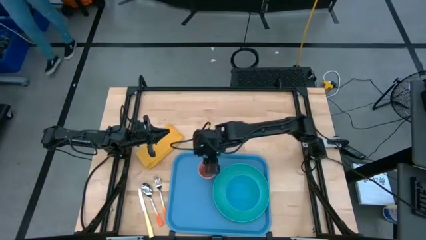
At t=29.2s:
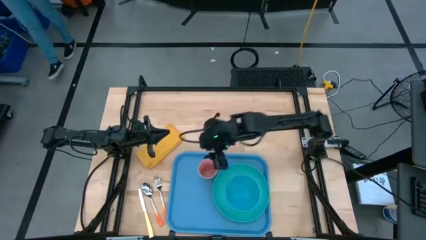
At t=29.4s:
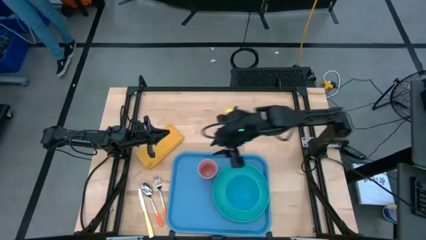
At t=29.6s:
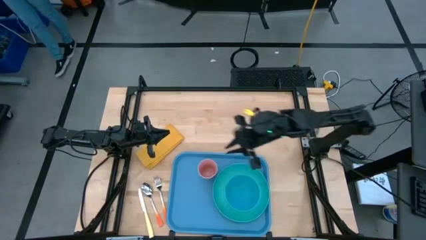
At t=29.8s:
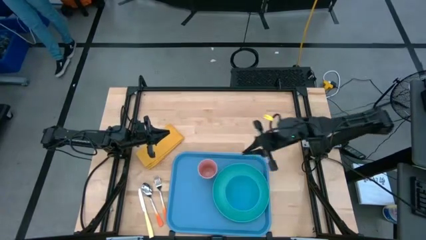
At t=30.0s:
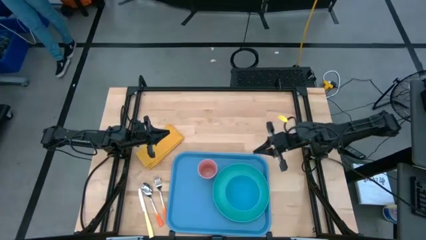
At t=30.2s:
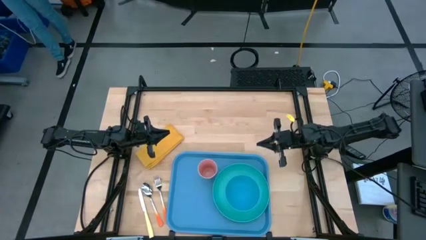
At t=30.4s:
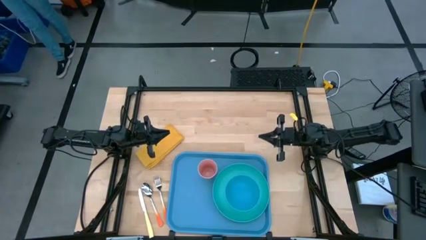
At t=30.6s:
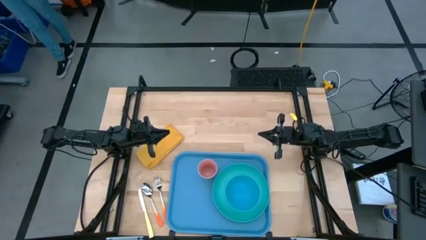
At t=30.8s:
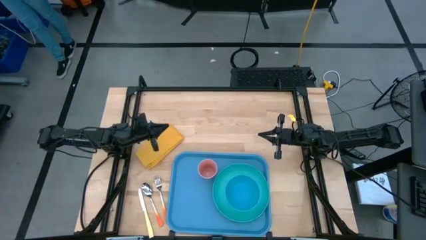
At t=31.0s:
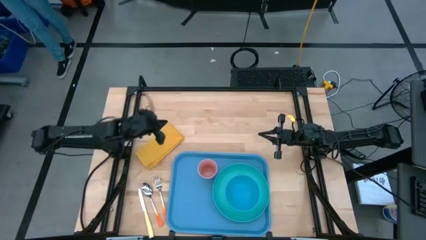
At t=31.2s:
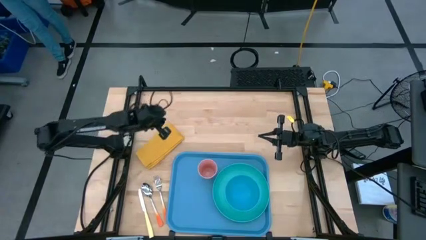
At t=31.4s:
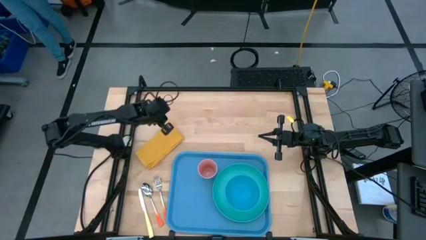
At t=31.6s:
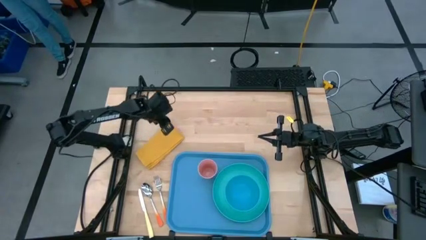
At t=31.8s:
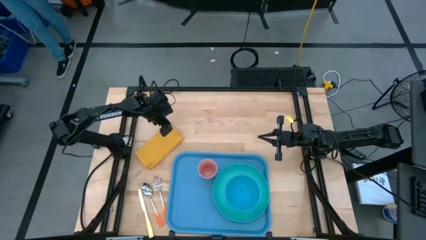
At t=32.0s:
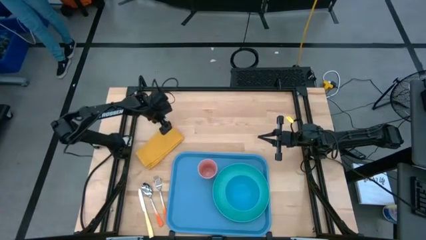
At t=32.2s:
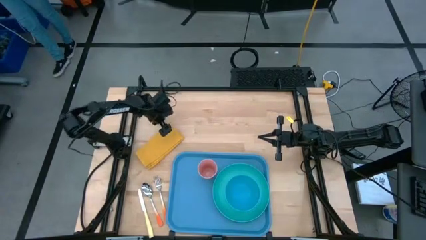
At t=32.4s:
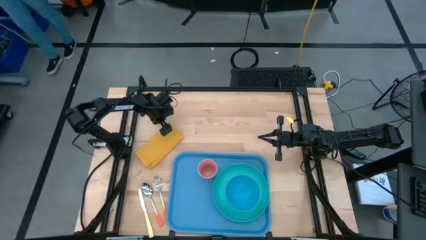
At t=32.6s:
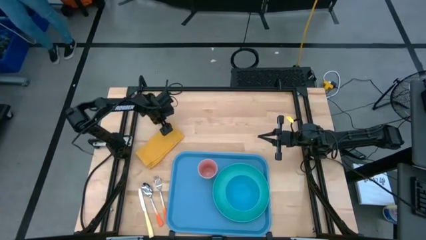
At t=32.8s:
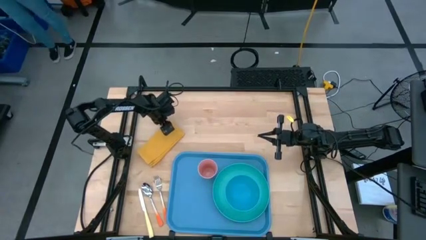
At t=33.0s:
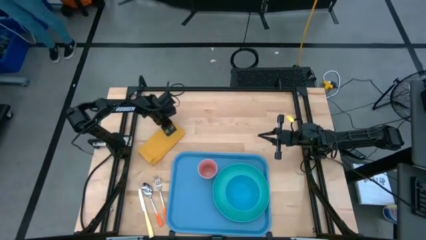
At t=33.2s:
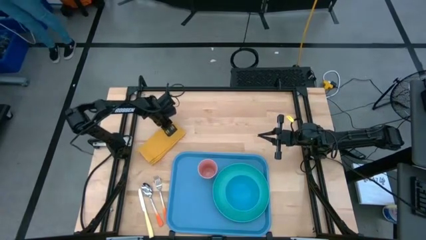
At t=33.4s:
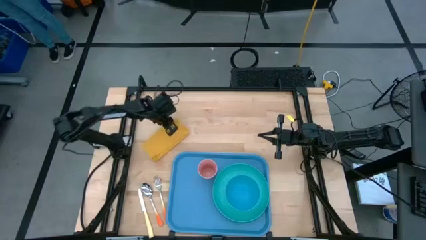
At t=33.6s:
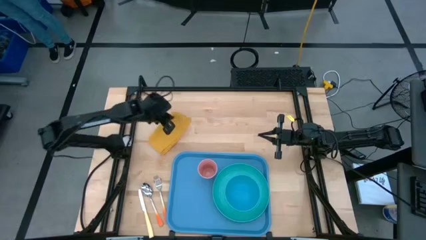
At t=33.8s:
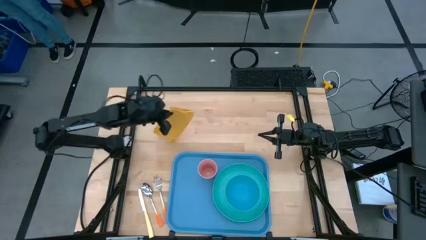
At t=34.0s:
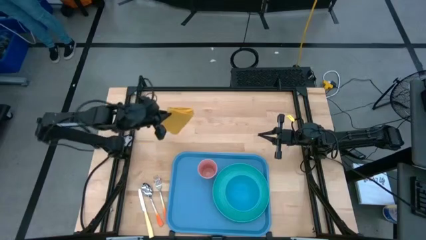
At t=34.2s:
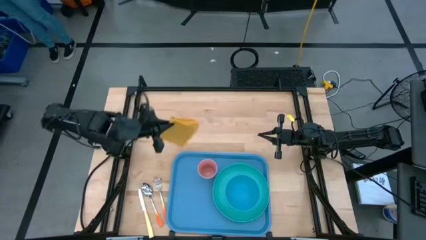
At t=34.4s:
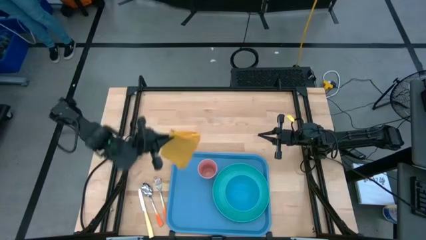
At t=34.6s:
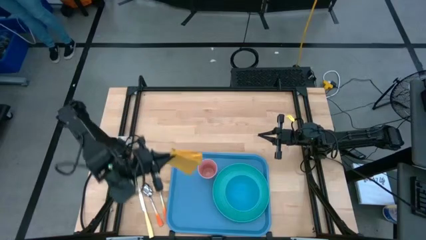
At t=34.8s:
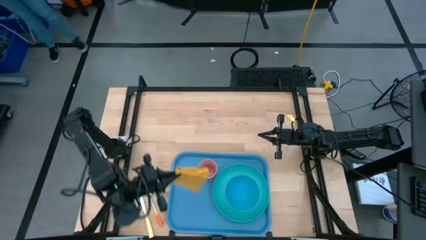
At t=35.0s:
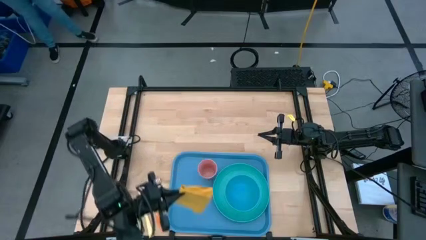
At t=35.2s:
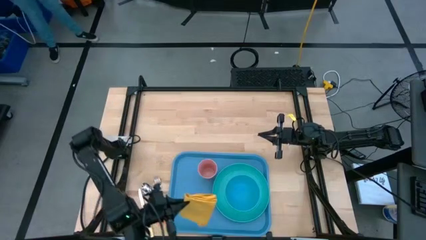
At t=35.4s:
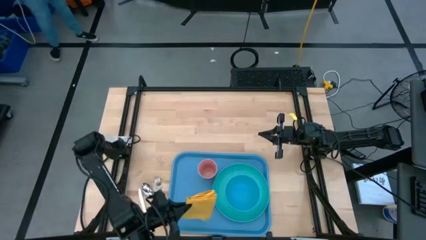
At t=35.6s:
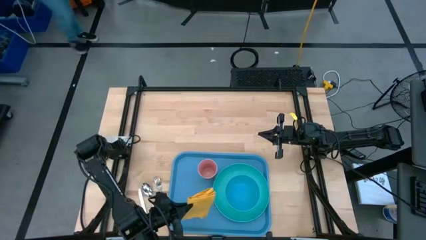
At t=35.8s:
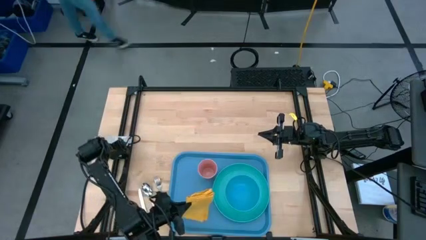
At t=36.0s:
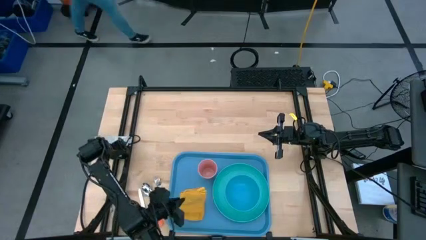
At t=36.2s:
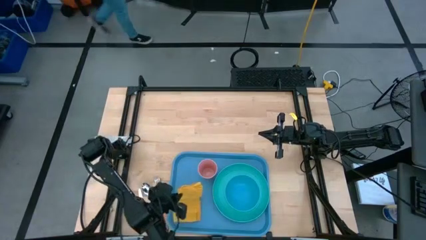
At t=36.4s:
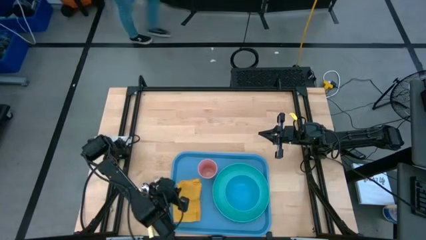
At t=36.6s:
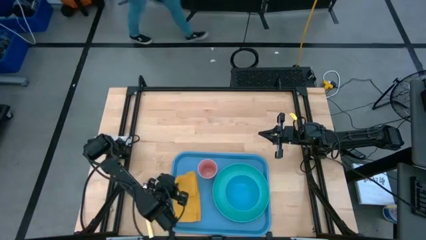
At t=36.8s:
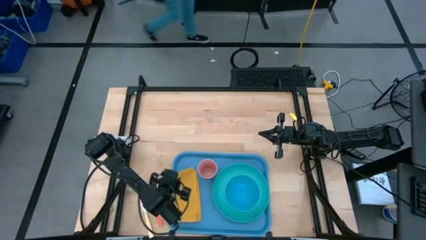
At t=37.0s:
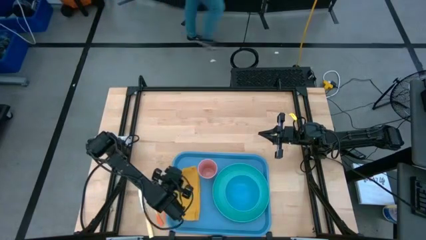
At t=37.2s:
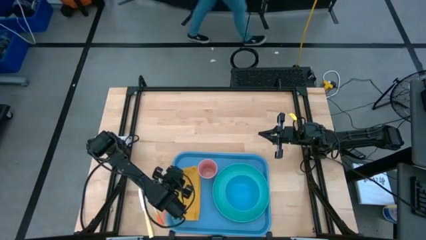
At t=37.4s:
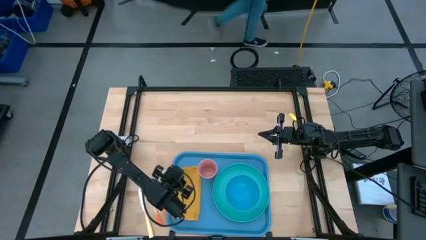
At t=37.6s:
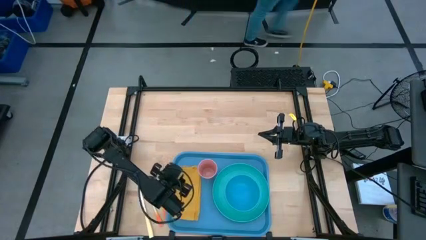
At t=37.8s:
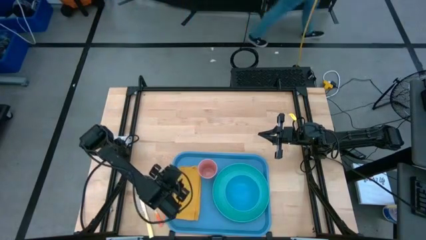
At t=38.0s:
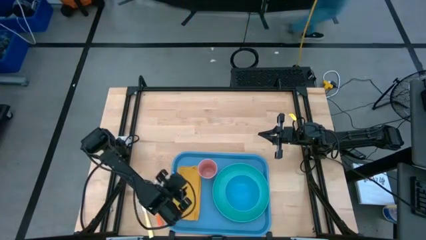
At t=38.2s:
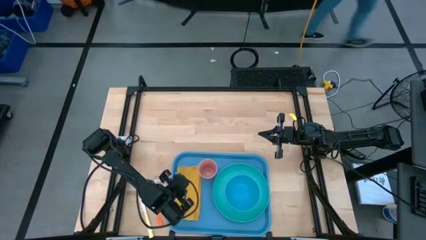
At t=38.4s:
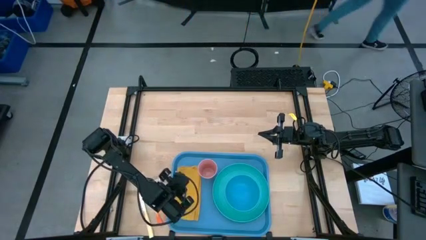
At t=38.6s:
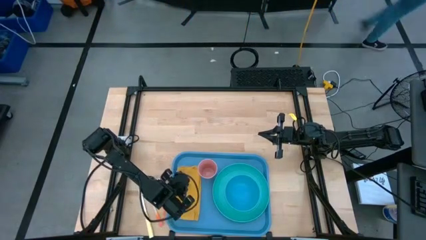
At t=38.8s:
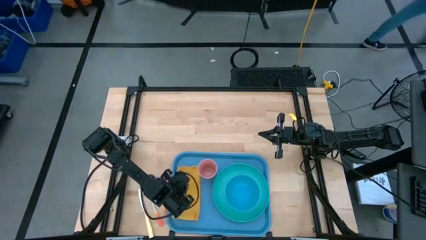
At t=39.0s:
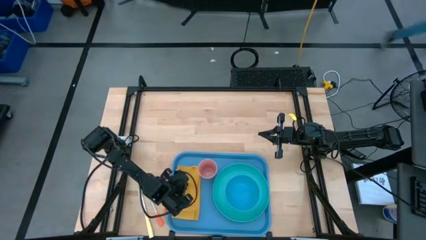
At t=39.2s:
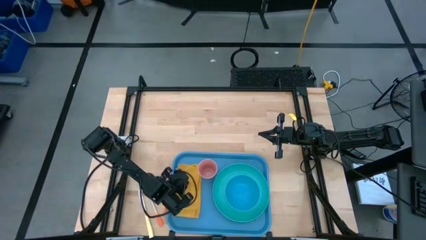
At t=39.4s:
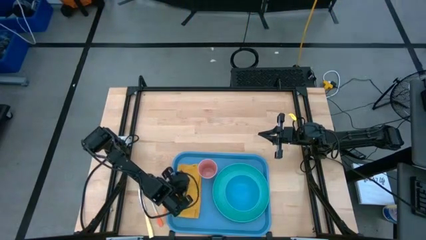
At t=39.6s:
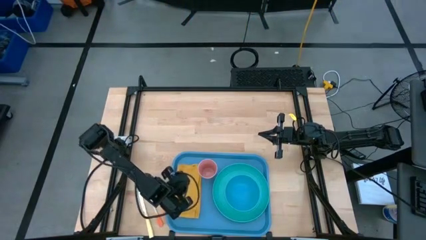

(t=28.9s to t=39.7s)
Task: Set up tray
Put the yellow napkin on the blue tray

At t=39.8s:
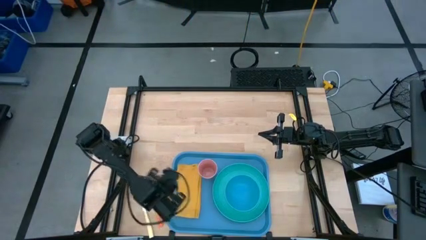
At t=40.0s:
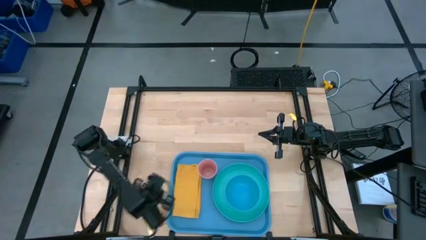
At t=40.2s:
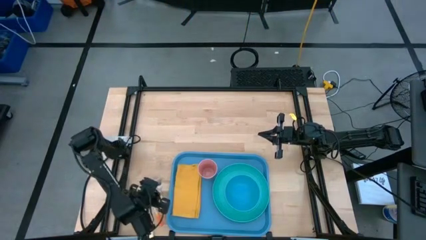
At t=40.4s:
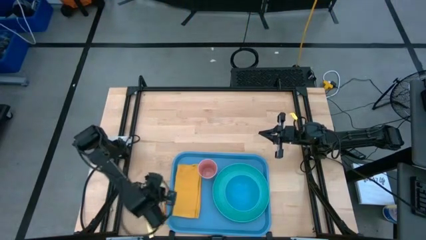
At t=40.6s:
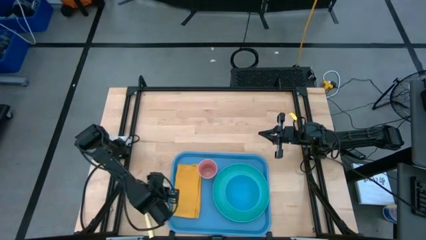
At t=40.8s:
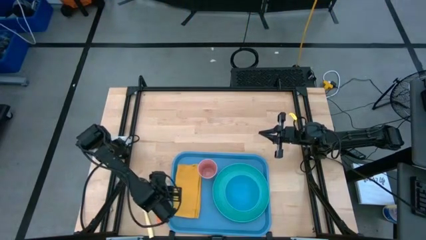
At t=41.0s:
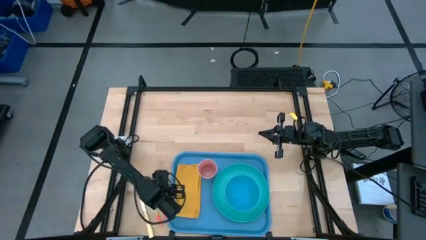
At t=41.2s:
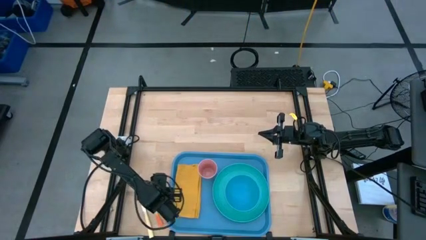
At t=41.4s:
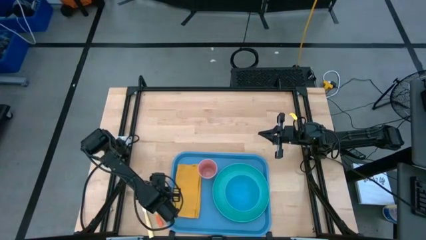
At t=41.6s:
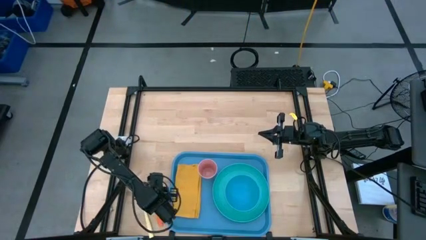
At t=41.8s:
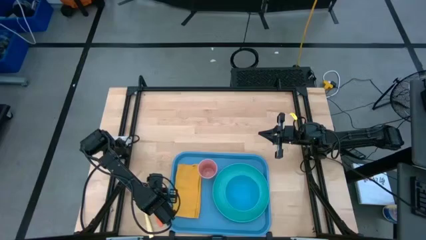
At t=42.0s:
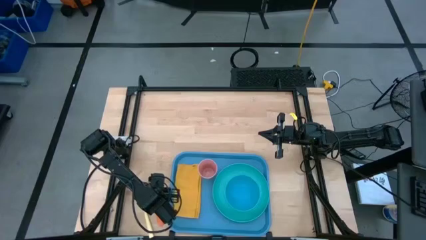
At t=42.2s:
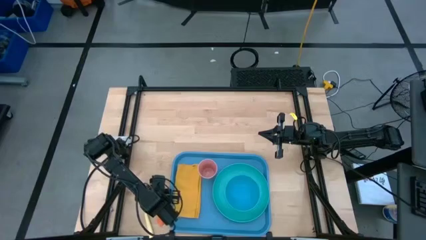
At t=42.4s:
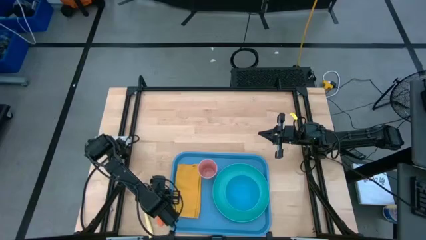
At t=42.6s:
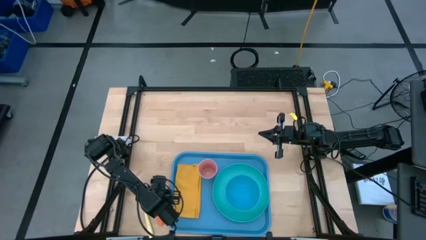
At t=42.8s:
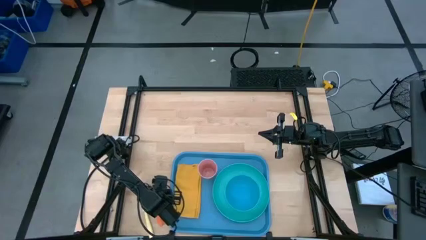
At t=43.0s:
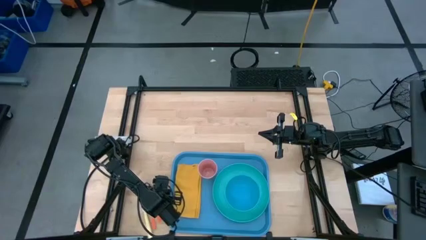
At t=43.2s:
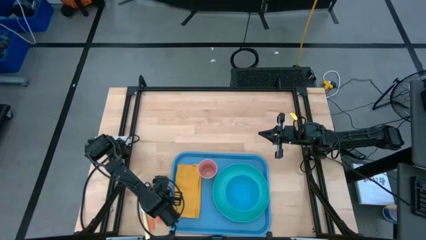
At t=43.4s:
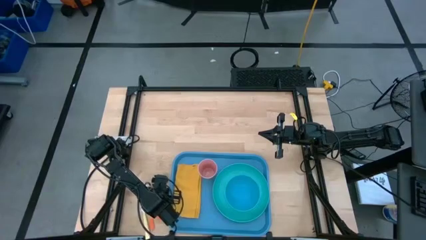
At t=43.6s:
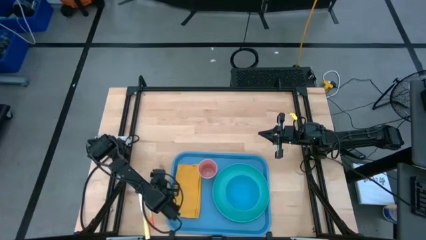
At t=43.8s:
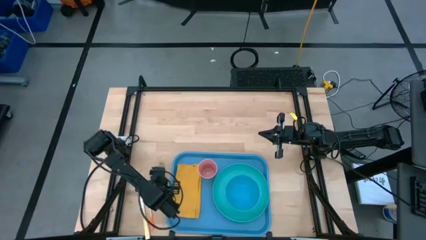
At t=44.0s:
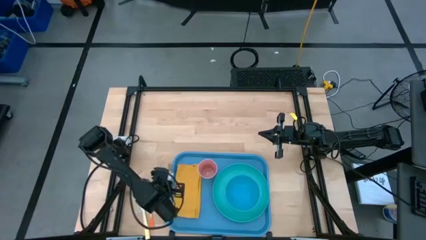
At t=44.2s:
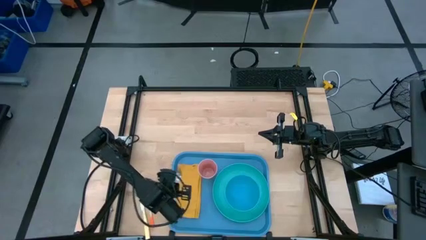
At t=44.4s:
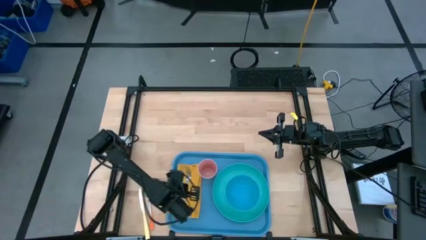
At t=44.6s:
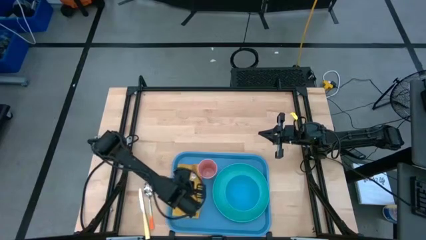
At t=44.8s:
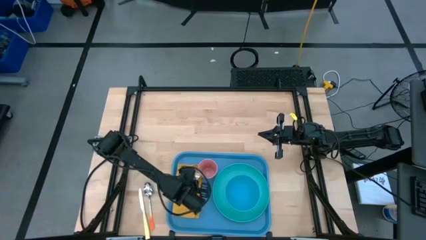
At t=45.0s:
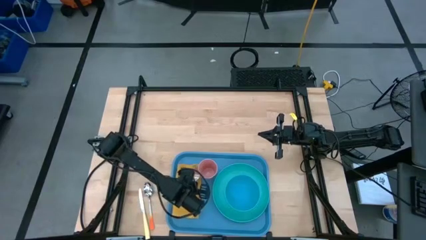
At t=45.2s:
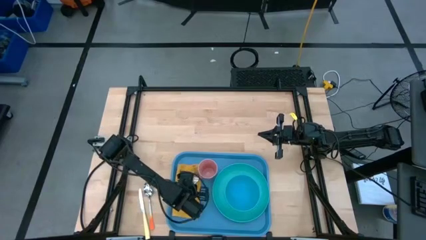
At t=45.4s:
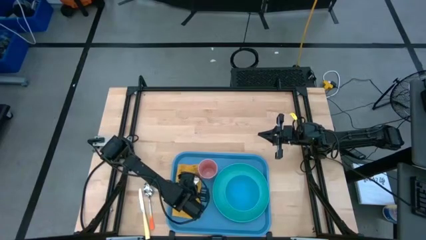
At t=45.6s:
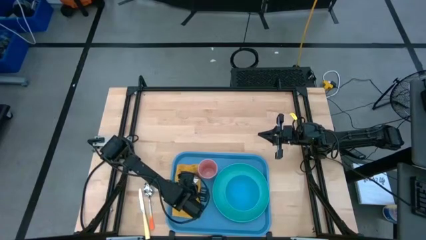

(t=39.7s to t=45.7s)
Put the orange fork on the yellow napkin
